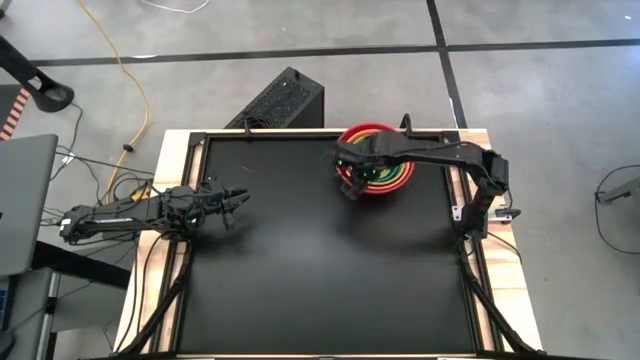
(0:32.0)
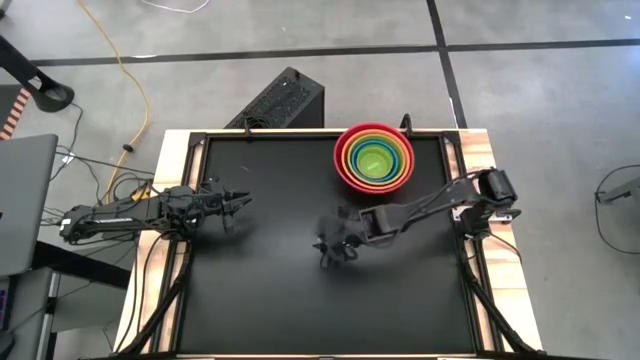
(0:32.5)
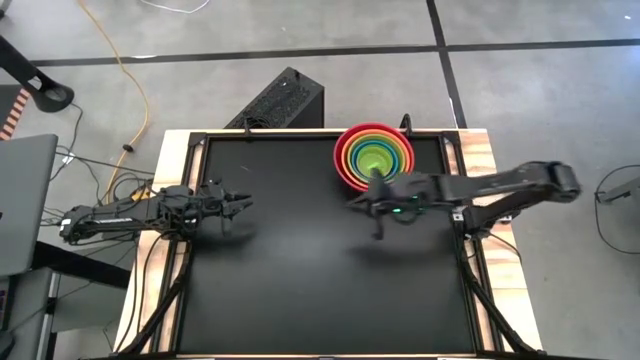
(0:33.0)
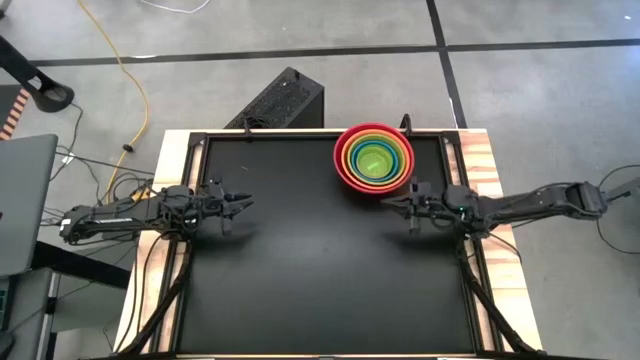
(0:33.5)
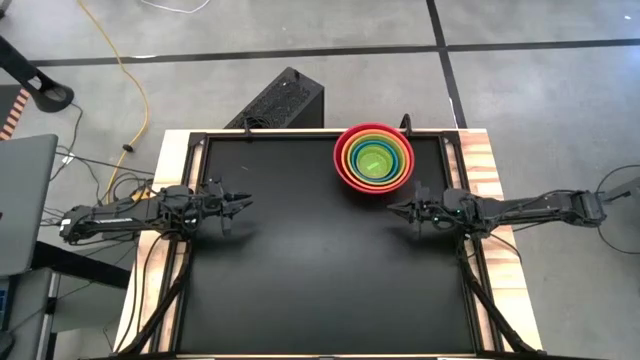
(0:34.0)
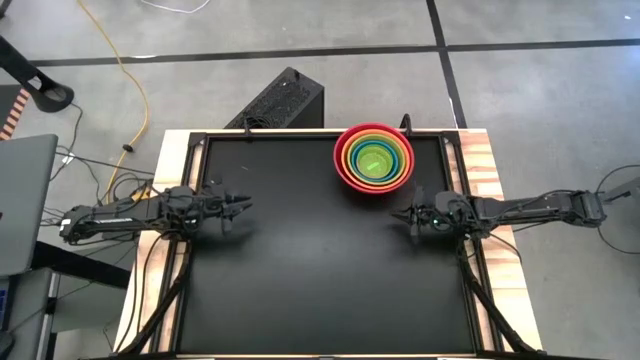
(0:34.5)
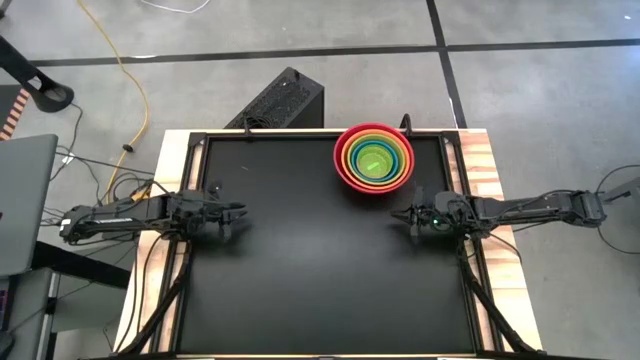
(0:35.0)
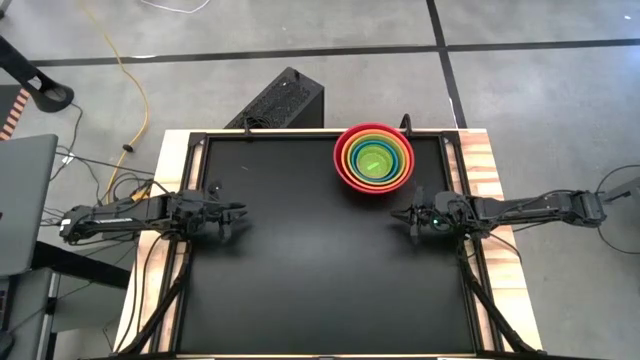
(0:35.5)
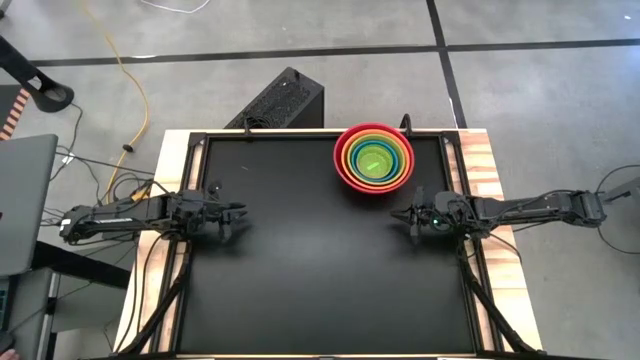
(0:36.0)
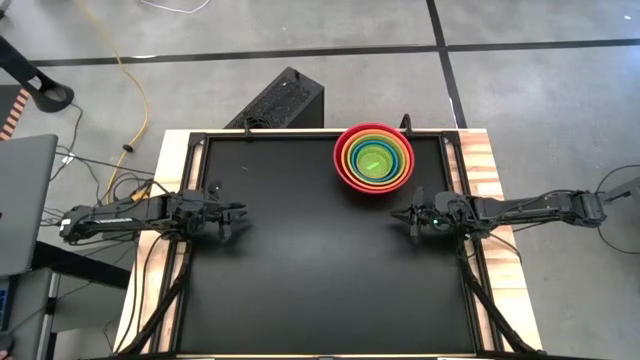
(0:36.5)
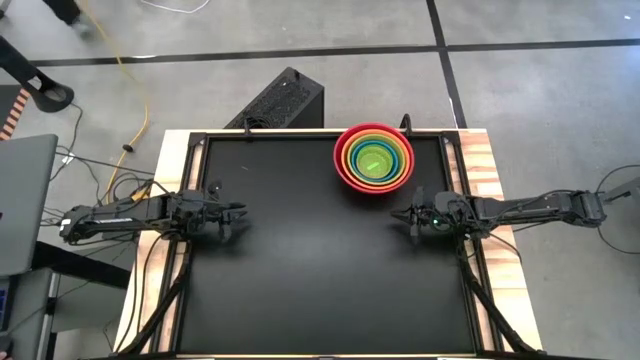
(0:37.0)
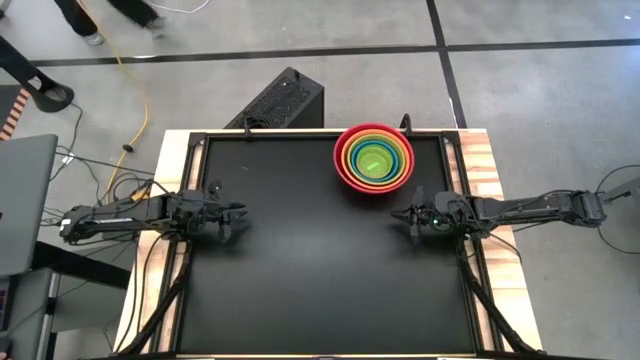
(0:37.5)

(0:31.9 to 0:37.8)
Return to Home Position

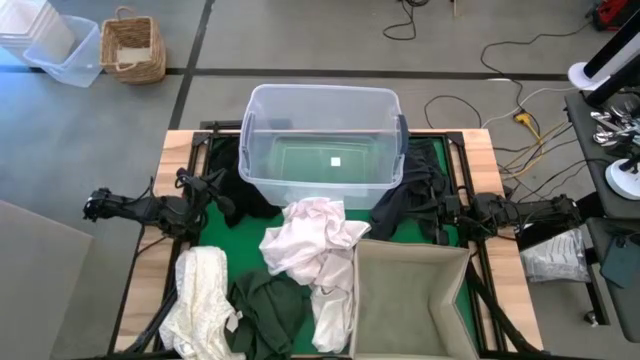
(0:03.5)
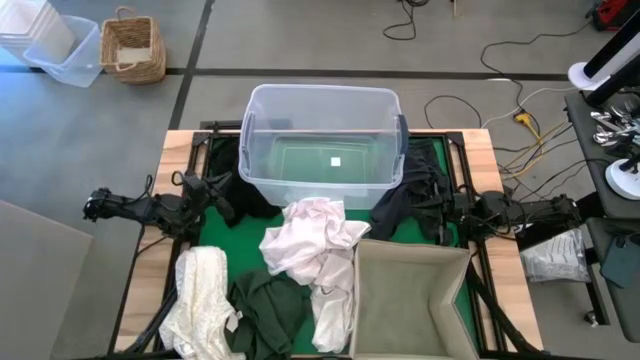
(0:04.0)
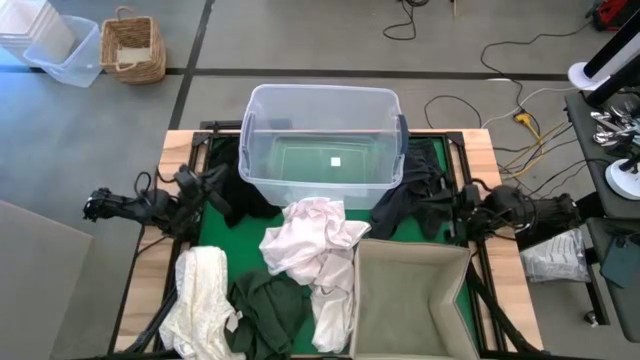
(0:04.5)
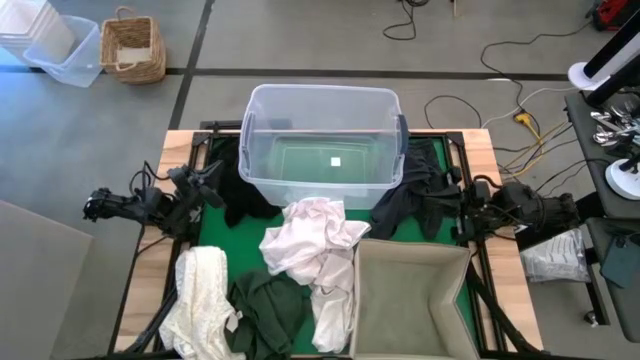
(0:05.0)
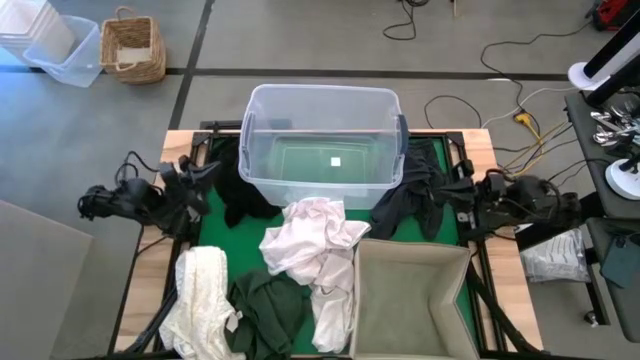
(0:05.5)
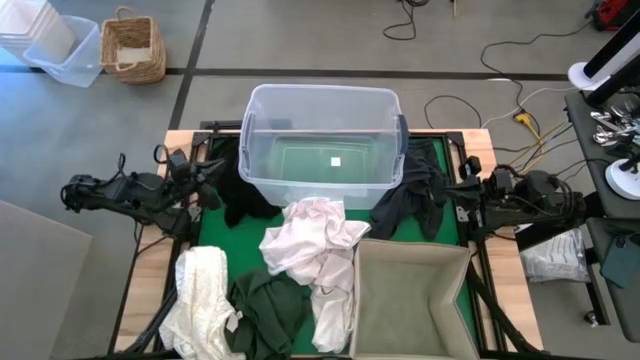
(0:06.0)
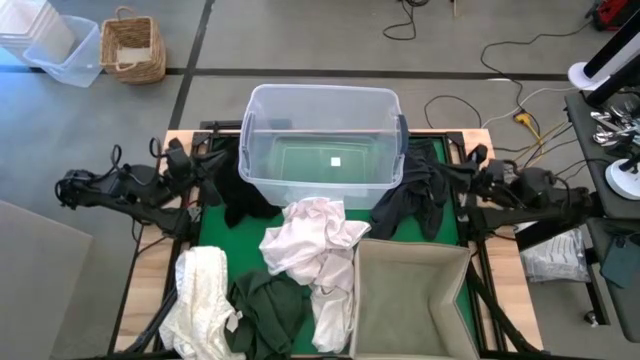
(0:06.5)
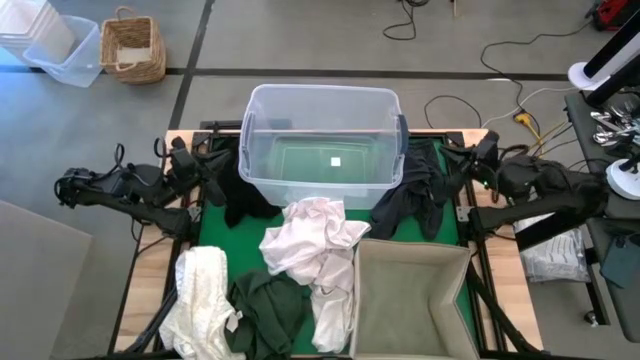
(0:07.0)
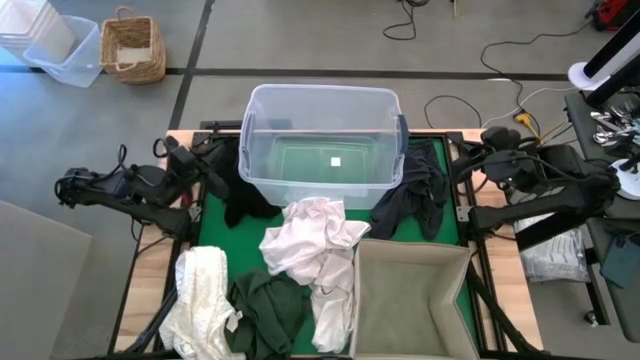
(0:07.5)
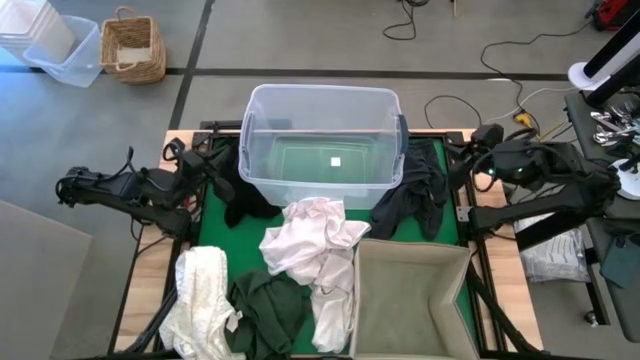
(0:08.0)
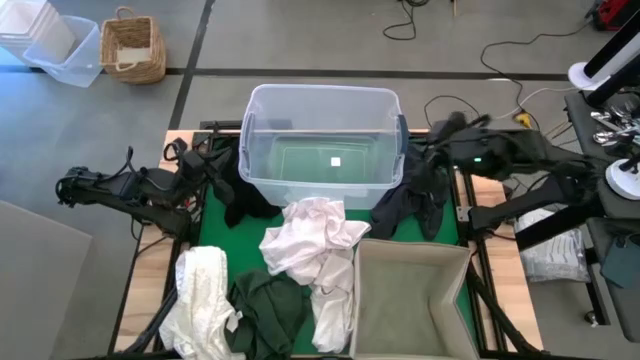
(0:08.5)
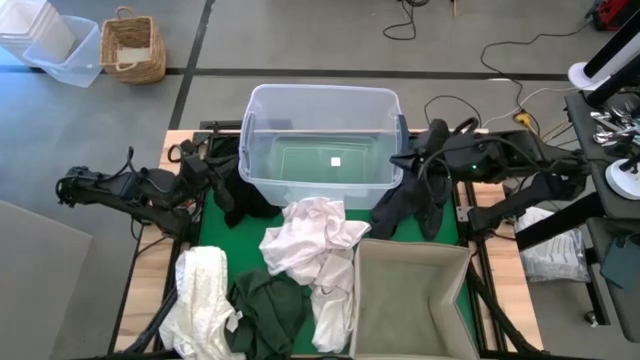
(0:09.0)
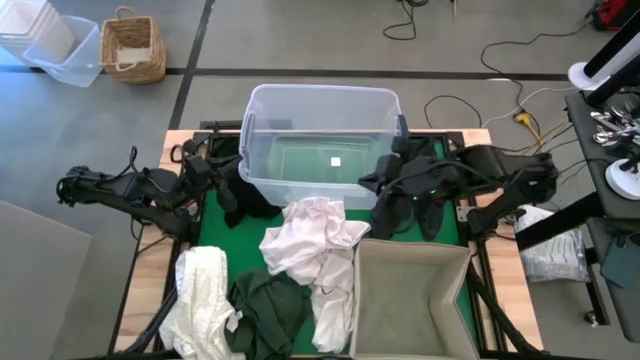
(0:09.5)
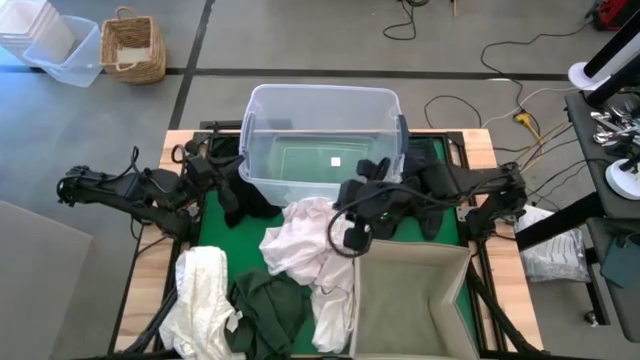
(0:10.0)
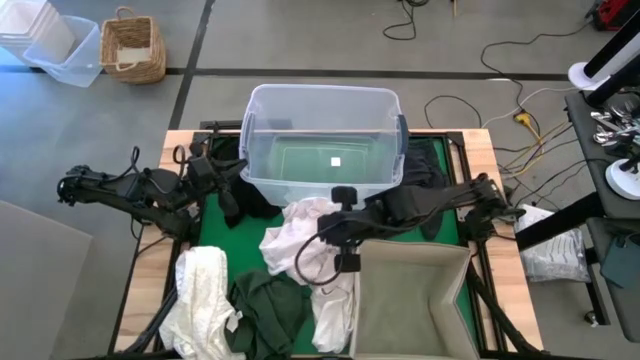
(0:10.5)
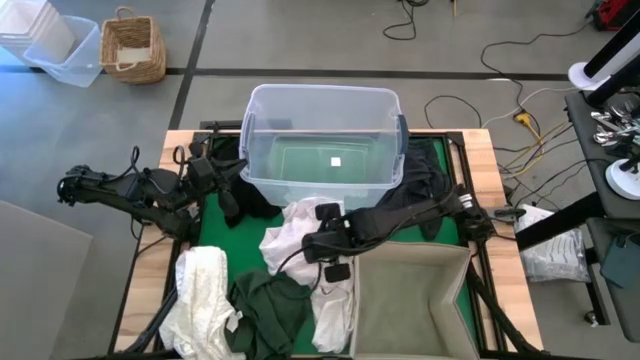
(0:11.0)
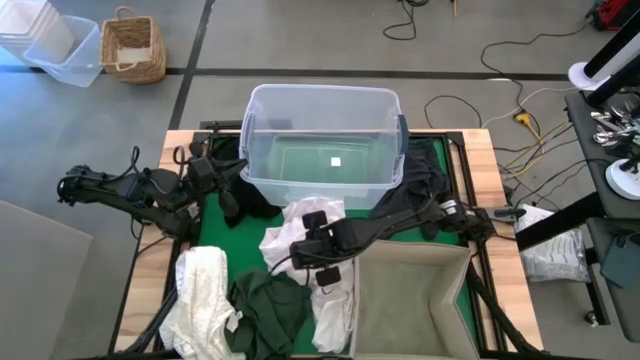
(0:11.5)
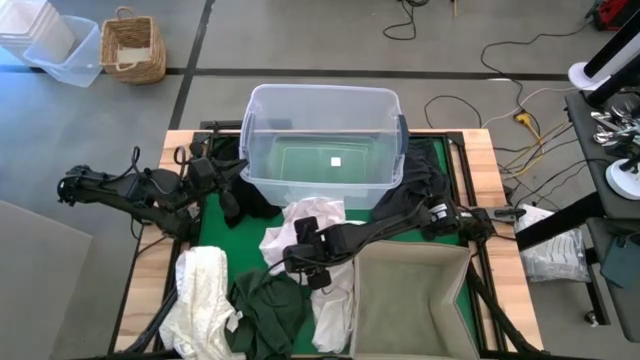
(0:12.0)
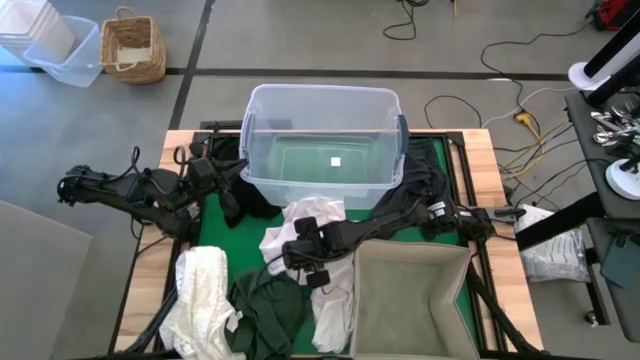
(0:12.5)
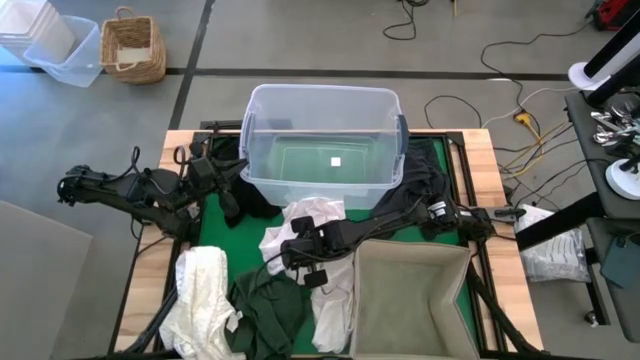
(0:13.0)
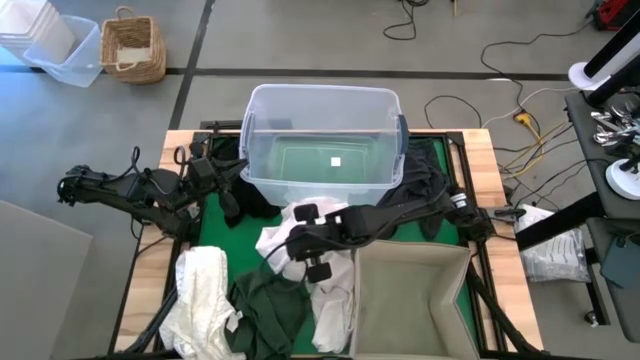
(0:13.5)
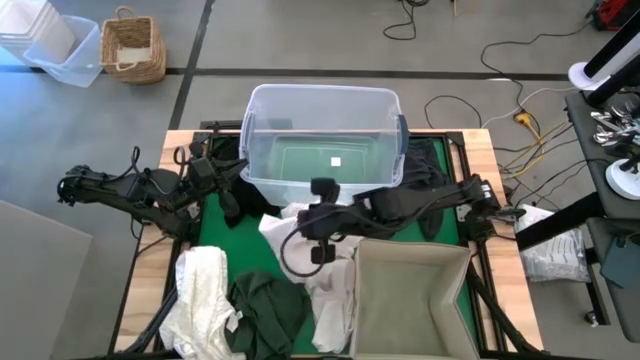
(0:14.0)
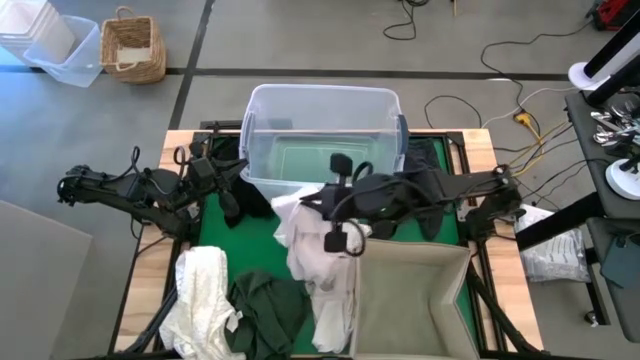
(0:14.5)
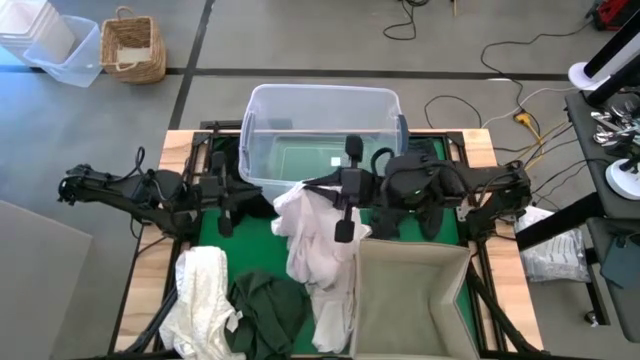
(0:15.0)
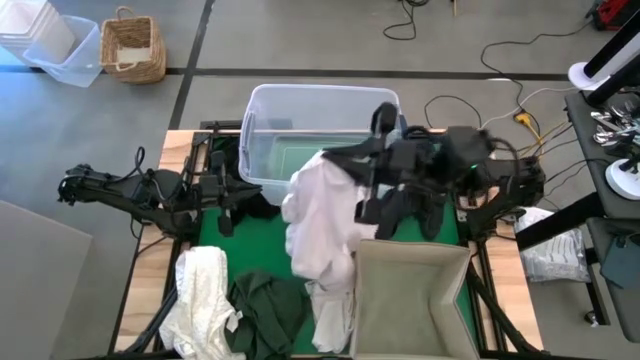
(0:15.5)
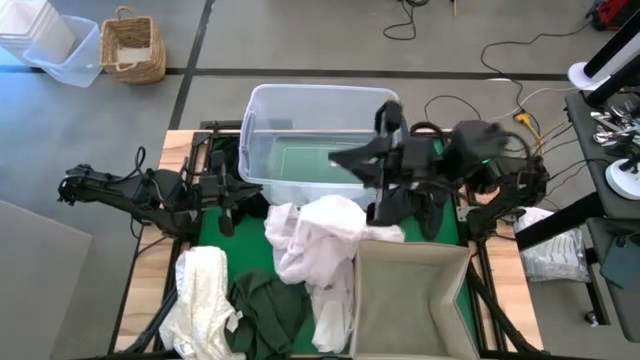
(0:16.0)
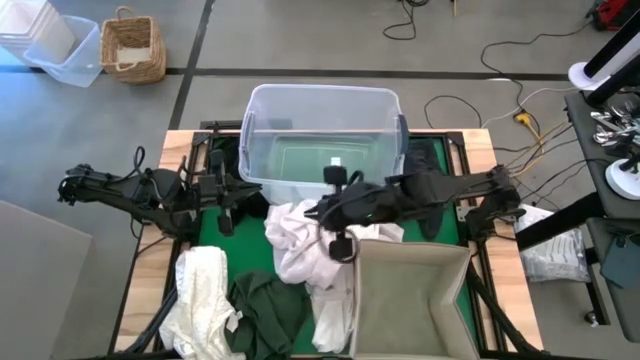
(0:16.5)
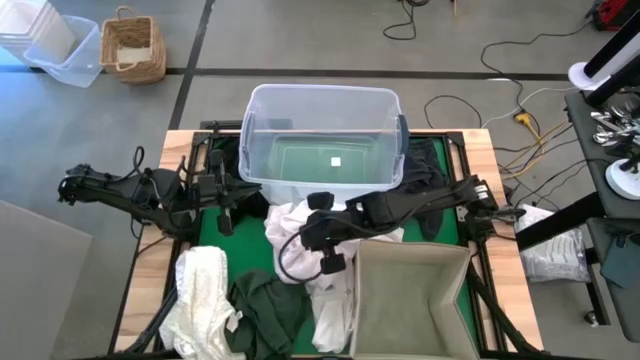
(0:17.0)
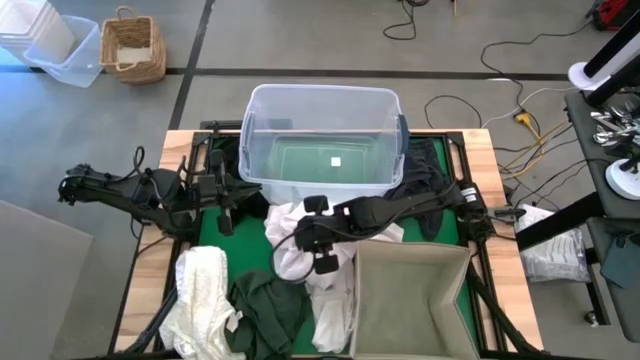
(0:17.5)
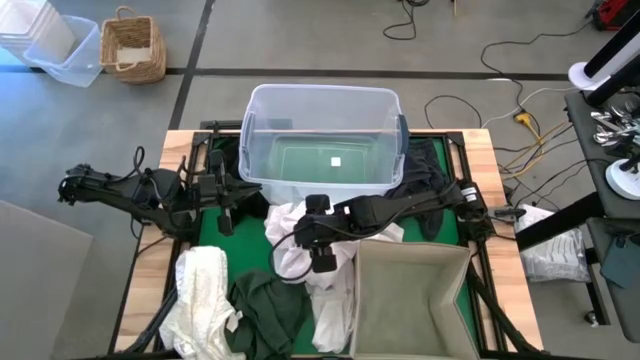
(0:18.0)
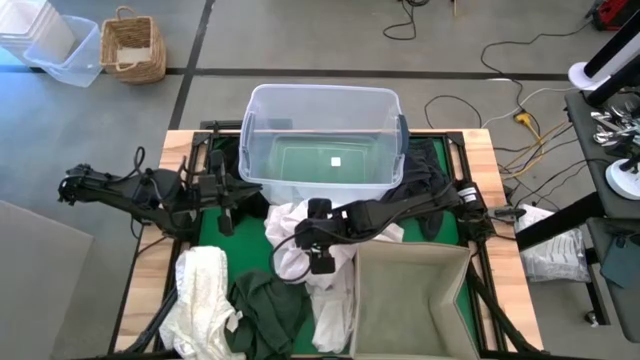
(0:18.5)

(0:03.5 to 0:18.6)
Put the top white shirt into the transparent laundry bin
